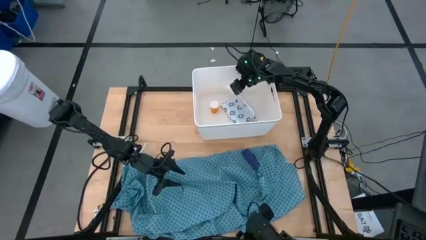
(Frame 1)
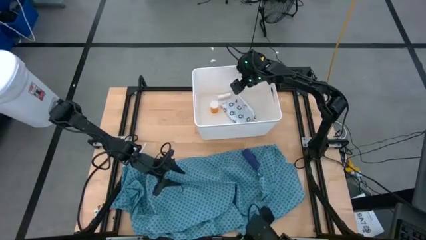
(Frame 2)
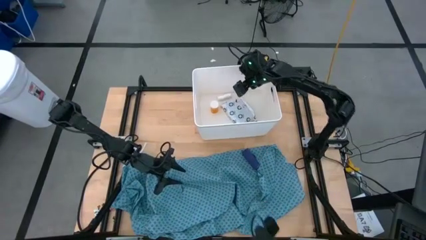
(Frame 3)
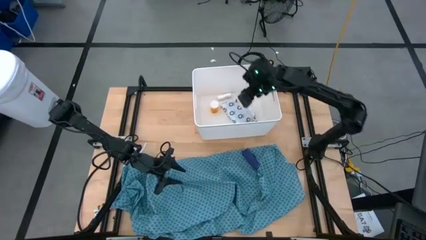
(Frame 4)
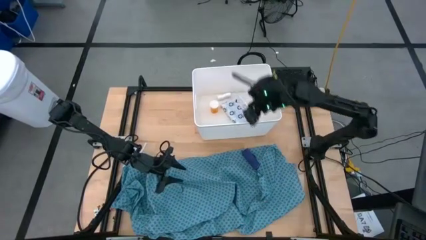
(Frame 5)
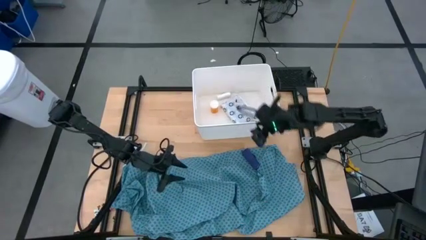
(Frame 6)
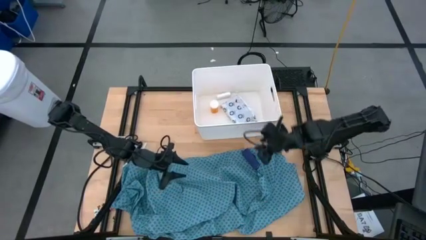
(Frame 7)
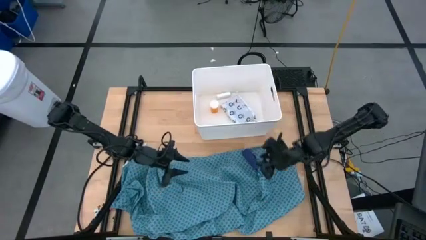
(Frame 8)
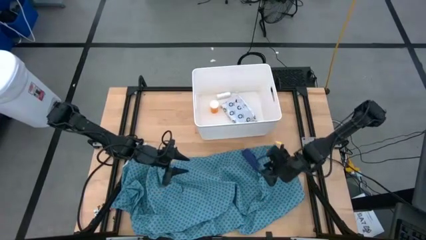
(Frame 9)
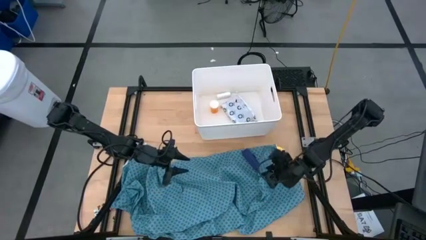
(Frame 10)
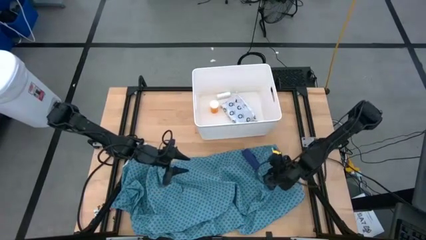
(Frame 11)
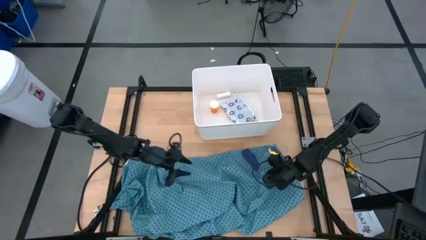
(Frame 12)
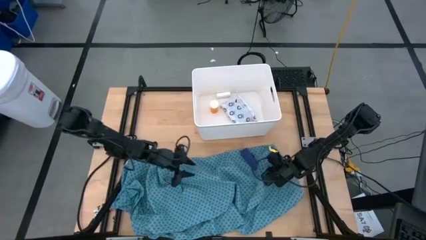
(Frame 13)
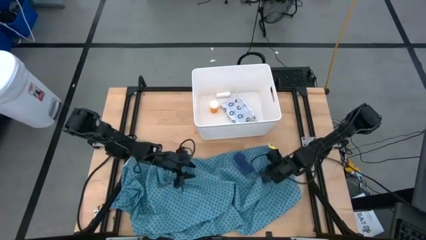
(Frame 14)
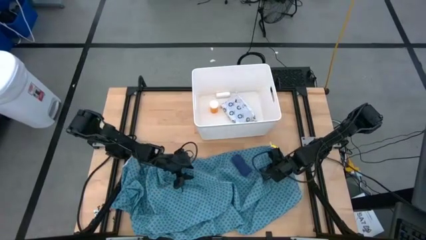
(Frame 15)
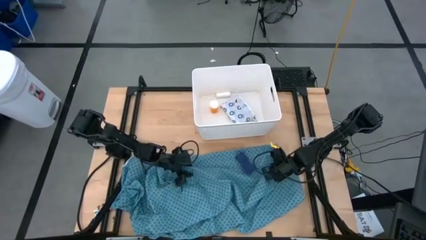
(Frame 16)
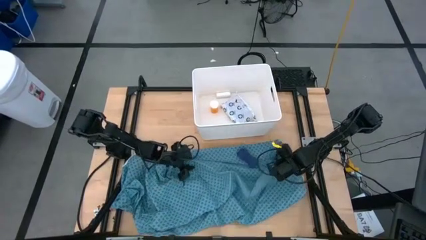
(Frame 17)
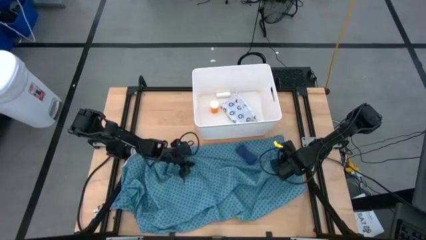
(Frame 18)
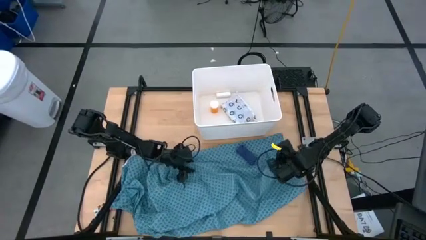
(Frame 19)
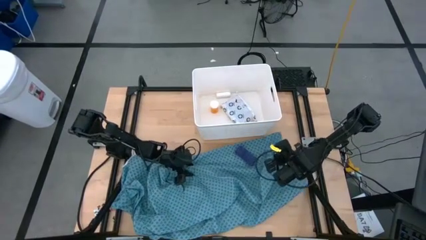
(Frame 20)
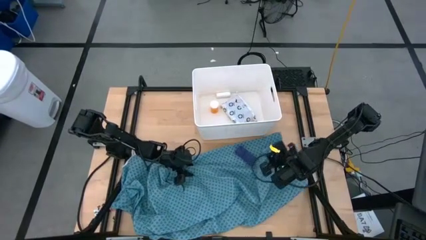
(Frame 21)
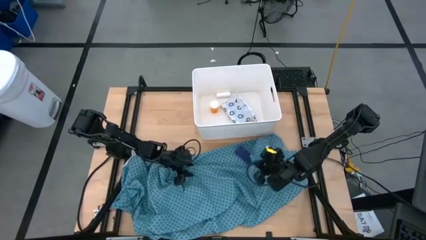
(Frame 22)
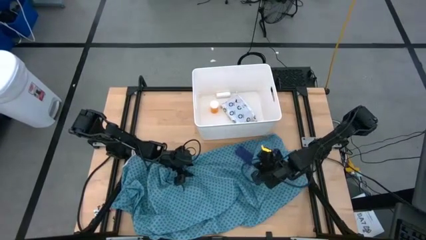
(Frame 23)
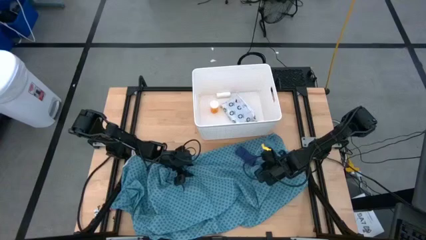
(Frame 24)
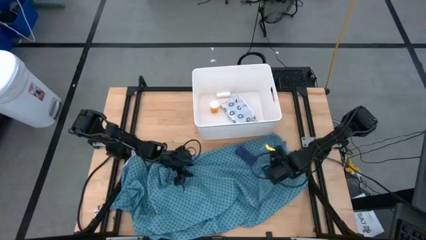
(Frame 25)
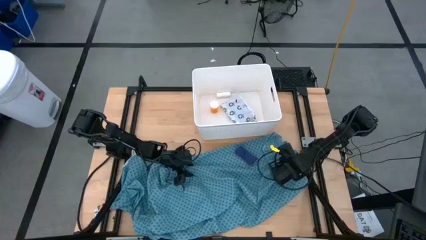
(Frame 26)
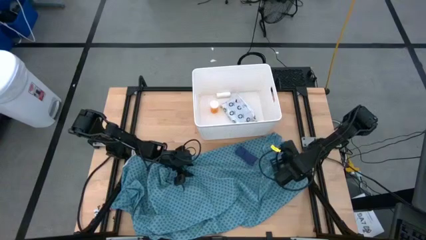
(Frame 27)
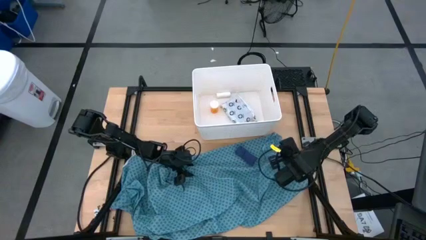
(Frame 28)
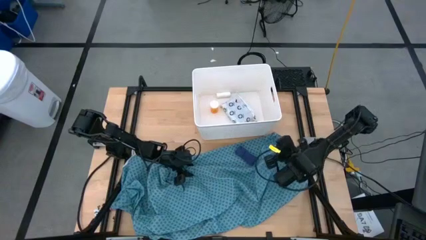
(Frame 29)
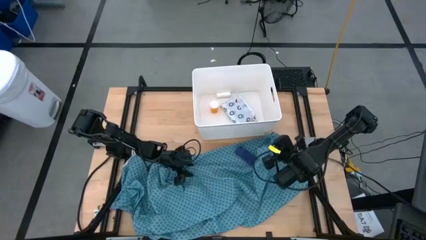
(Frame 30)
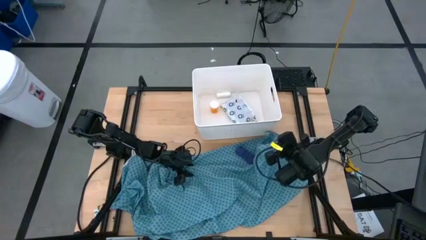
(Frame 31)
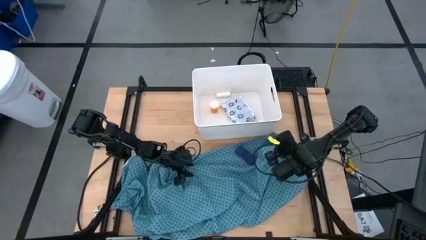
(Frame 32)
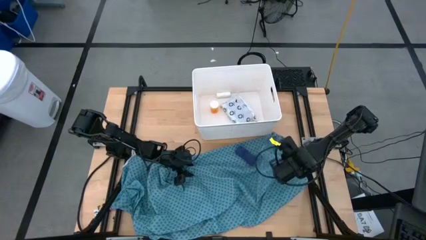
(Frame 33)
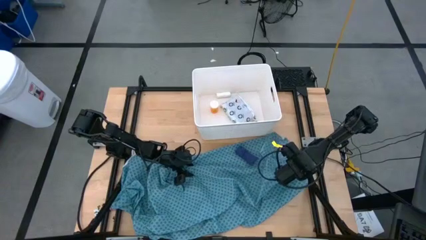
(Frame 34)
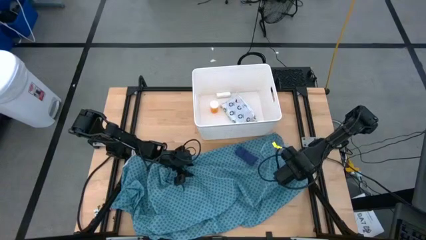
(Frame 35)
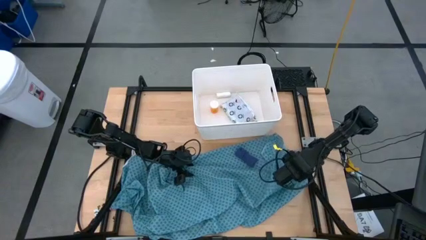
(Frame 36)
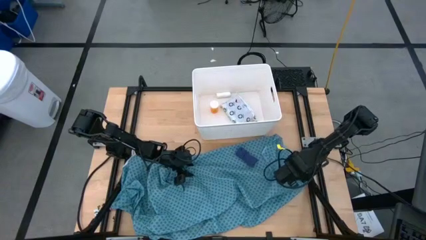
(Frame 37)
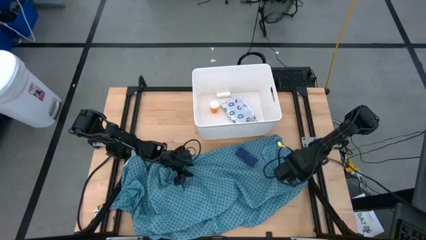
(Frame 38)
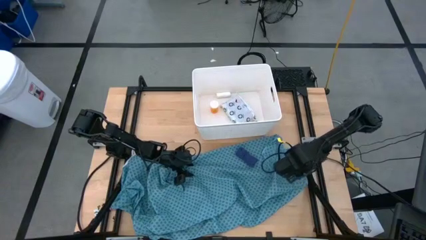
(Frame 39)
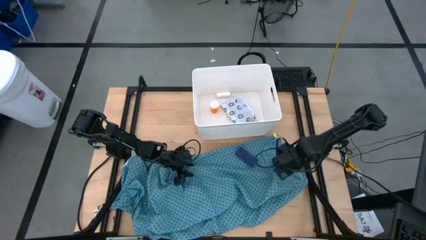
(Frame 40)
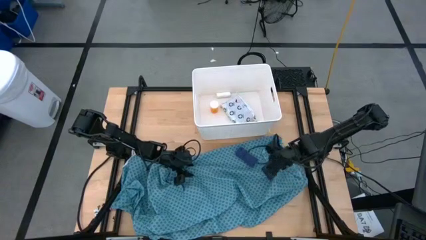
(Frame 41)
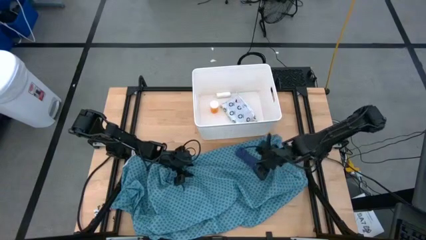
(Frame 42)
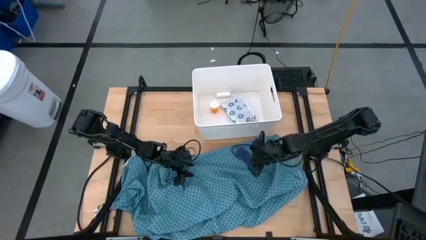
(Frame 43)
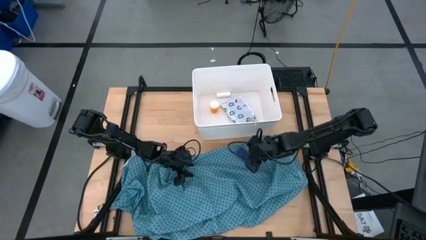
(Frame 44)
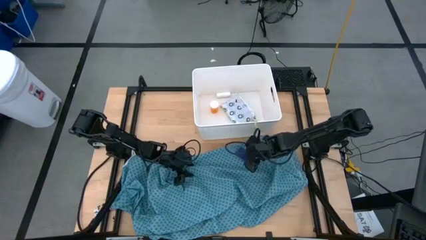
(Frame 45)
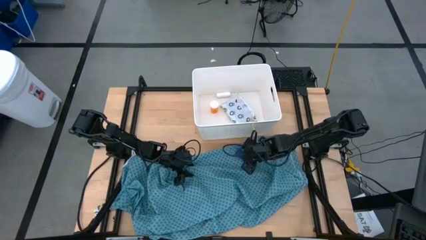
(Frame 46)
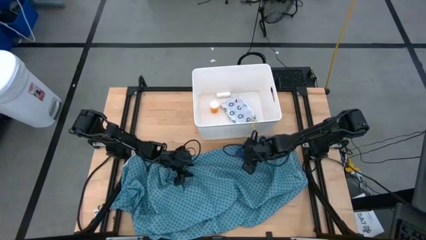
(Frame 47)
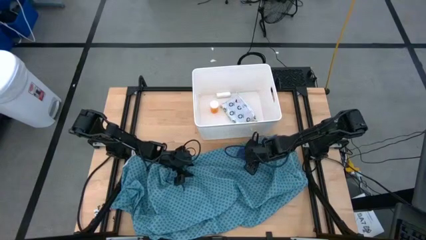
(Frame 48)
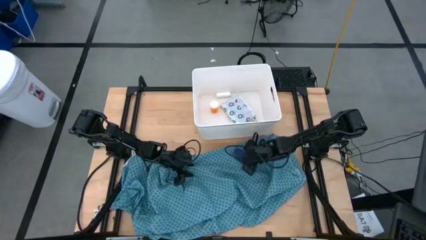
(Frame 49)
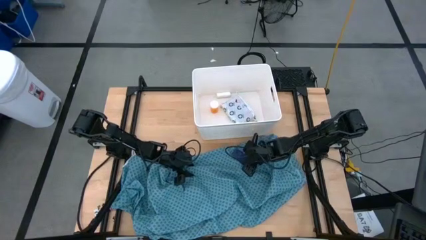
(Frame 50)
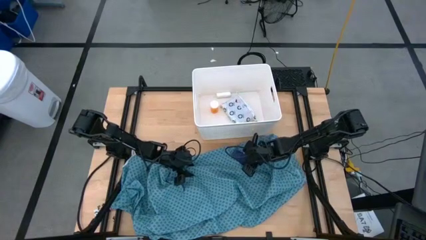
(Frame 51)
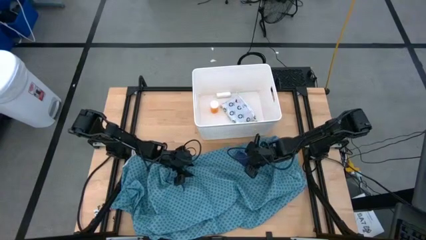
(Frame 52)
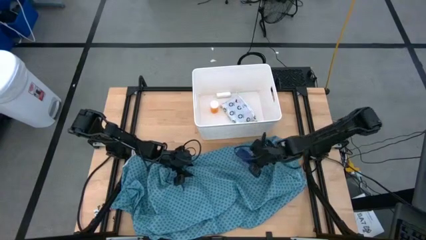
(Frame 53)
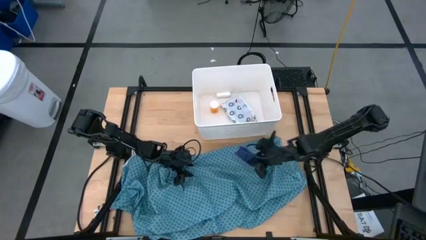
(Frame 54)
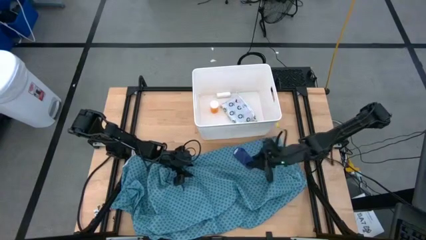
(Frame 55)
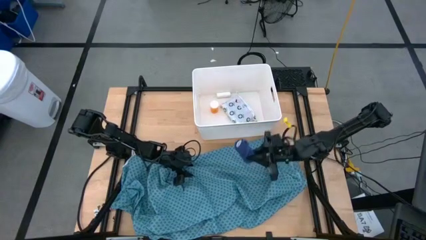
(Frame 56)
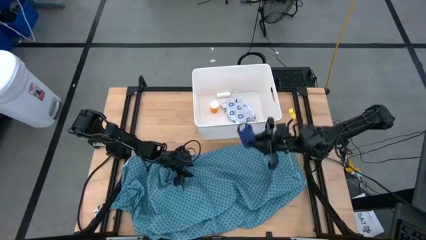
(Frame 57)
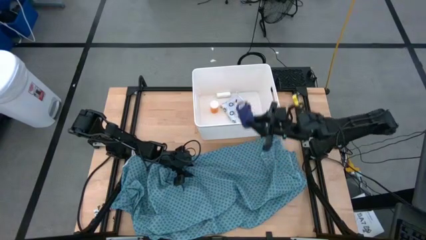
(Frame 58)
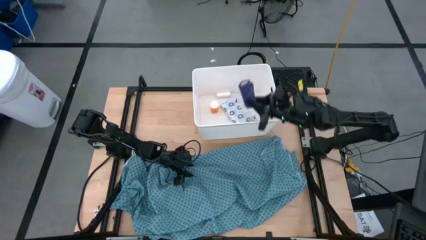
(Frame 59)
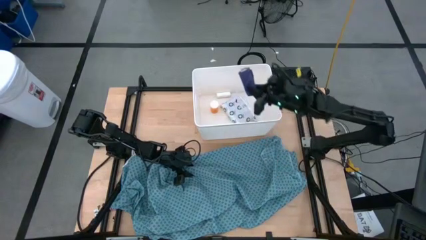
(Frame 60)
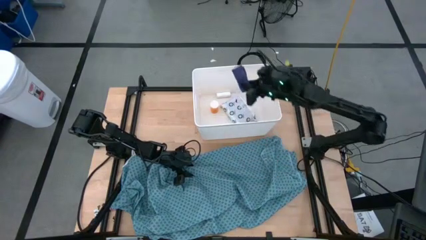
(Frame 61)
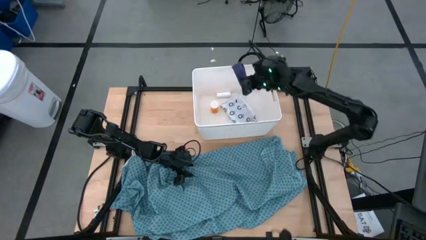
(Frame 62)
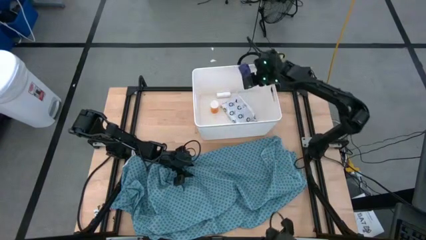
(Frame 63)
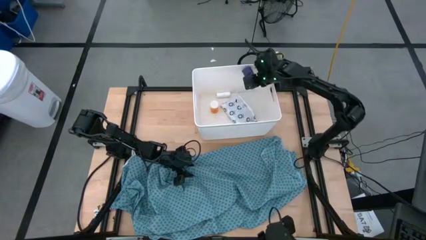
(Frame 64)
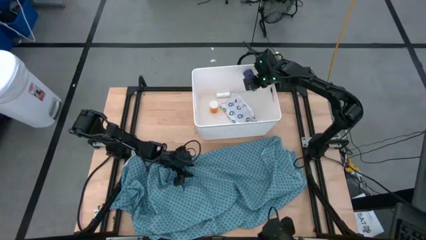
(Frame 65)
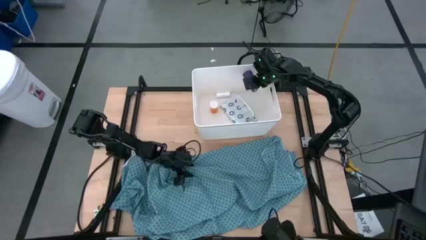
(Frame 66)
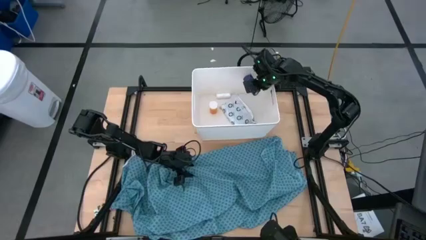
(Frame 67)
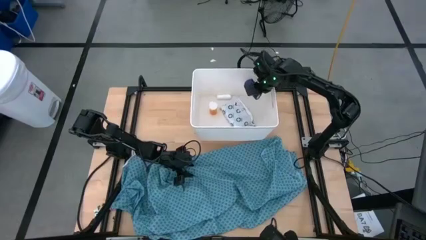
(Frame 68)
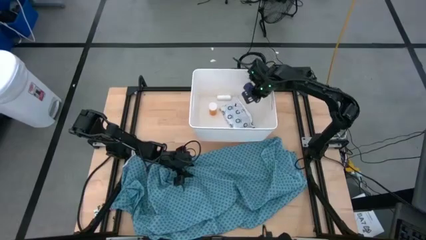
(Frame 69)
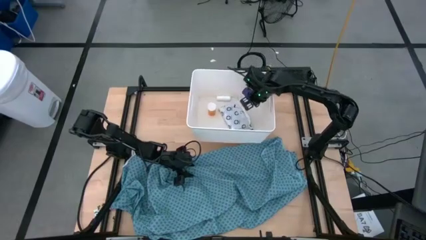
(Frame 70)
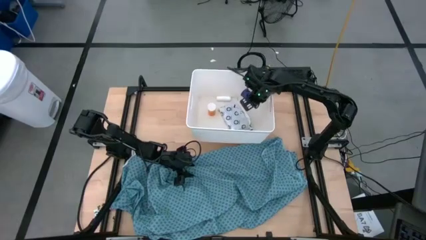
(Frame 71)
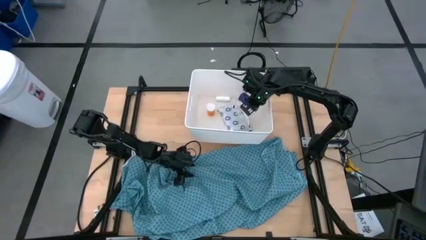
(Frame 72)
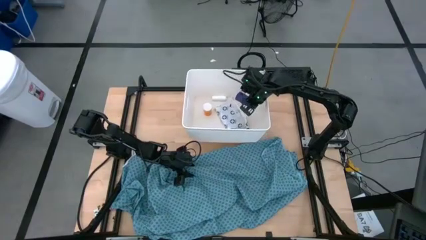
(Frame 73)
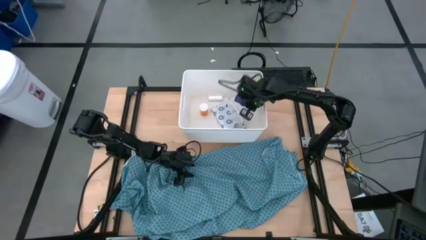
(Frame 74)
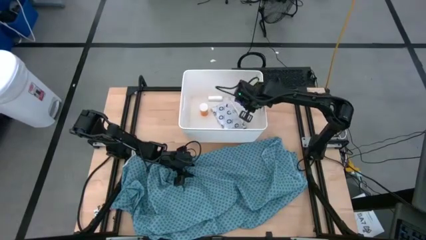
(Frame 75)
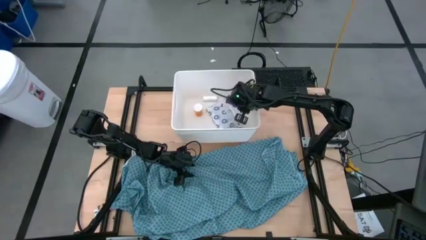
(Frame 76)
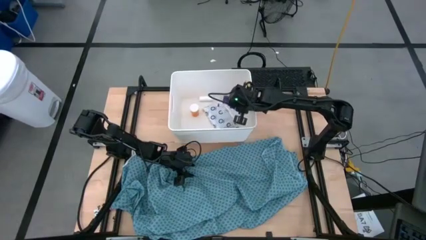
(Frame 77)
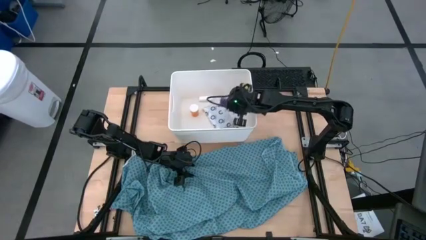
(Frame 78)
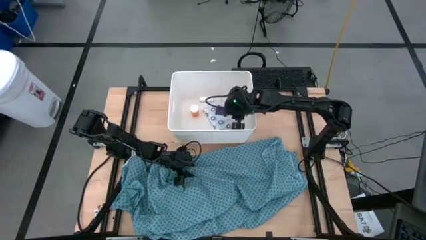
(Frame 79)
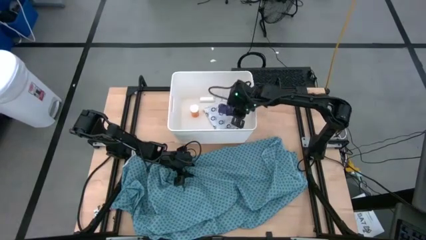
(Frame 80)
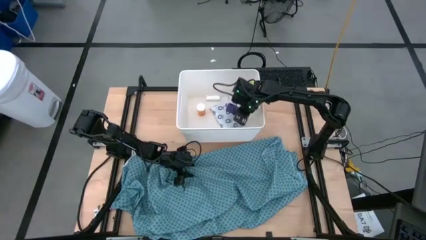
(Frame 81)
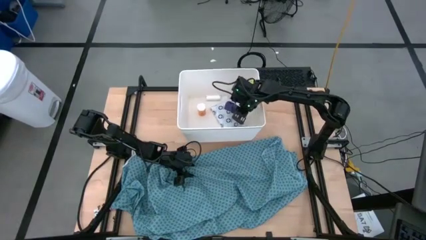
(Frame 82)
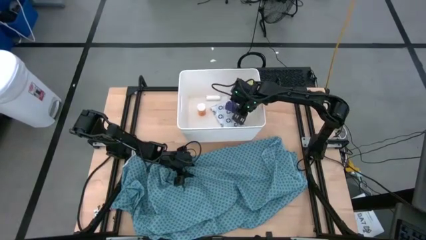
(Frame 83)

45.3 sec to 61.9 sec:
Task: Pick & place medical supplies in basket/bin
Put the blue bandage into the white bin

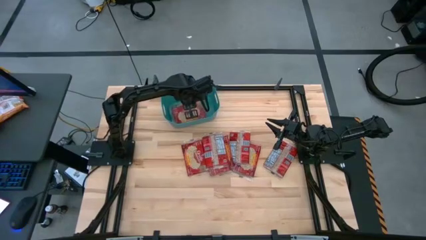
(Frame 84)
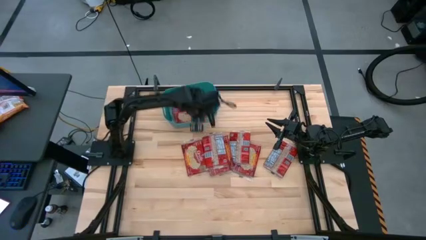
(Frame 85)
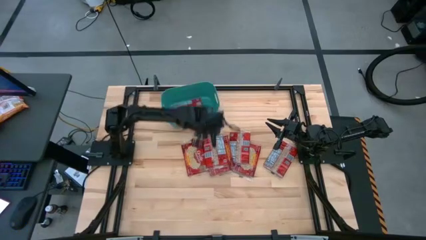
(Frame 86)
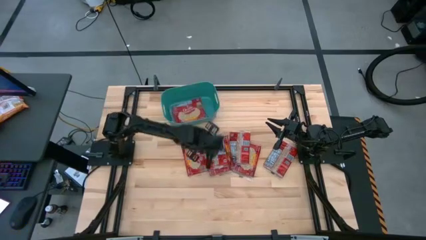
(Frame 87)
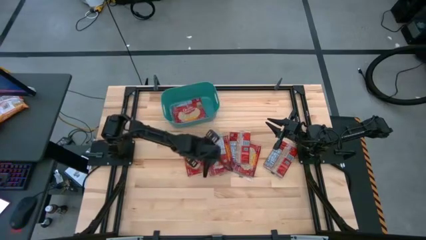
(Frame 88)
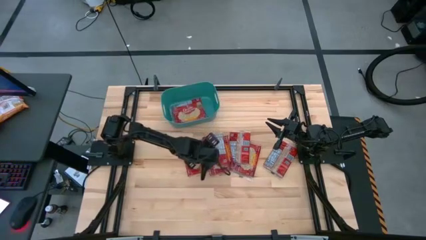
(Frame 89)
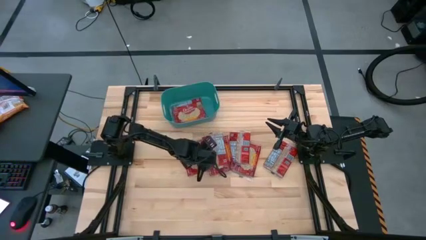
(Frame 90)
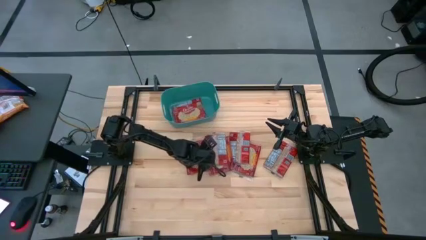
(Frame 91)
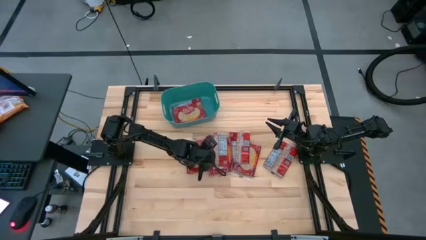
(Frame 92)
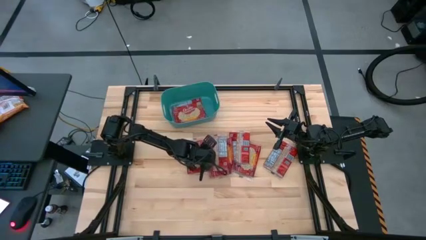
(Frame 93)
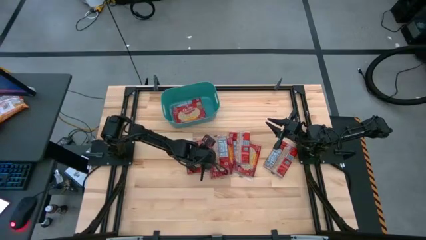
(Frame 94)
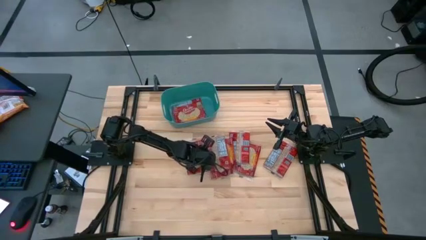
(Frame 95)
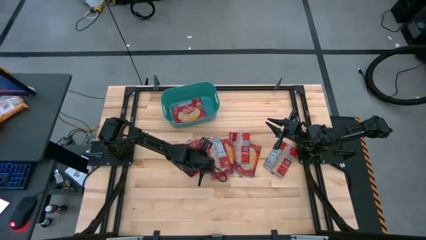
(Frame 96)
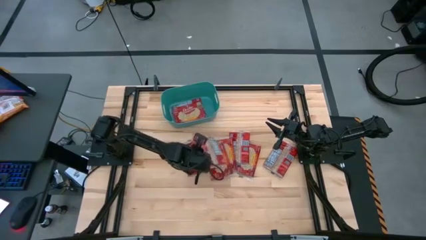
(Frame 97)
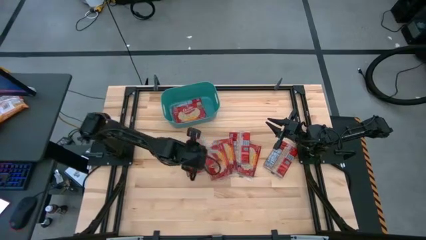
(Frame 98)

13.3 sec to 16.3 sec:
Task: Sort popcorn bags into baskets
Stack the popcorn bag into the green bin
